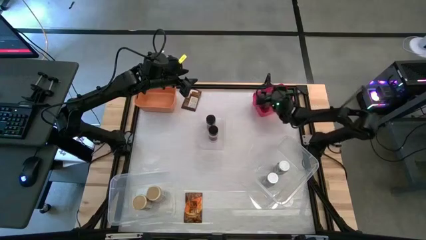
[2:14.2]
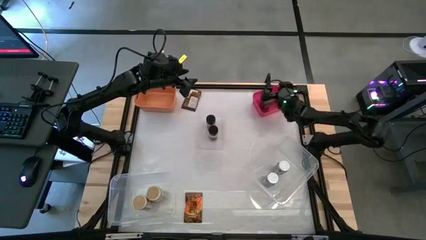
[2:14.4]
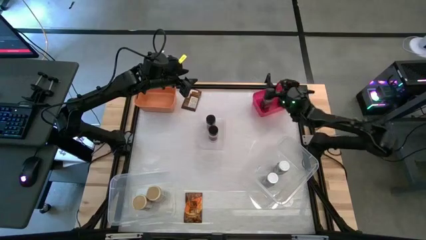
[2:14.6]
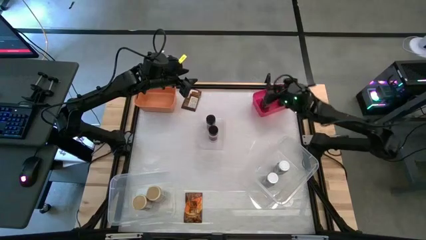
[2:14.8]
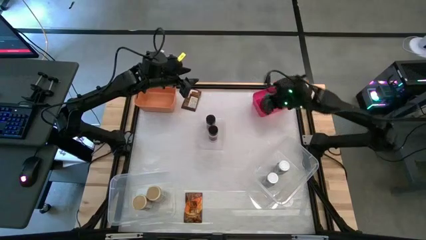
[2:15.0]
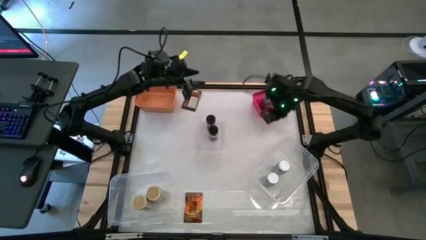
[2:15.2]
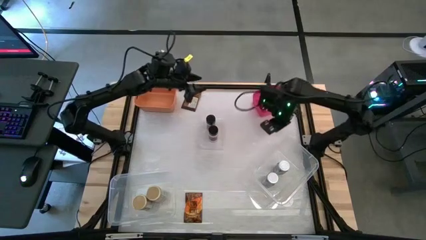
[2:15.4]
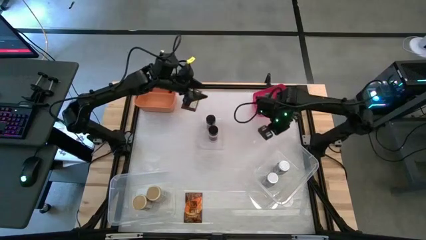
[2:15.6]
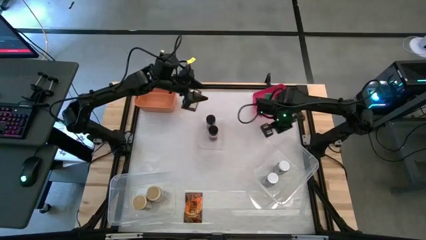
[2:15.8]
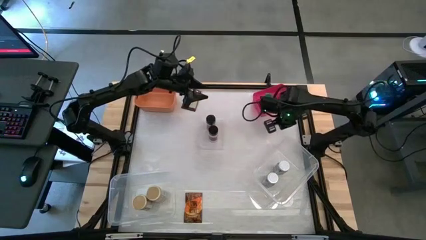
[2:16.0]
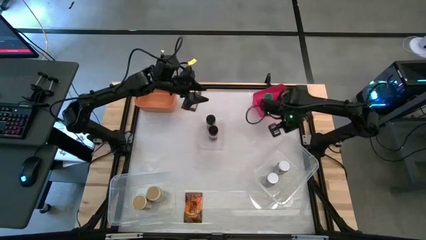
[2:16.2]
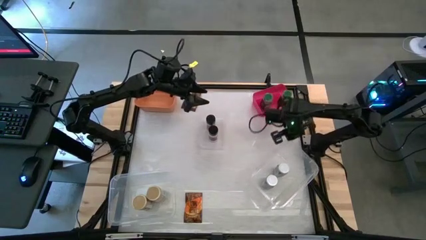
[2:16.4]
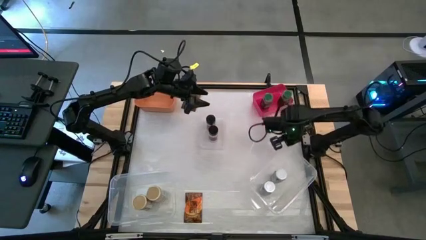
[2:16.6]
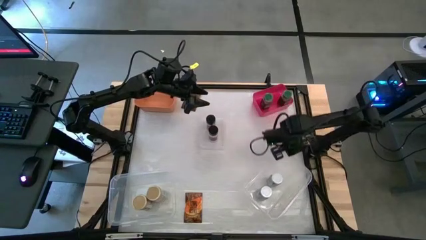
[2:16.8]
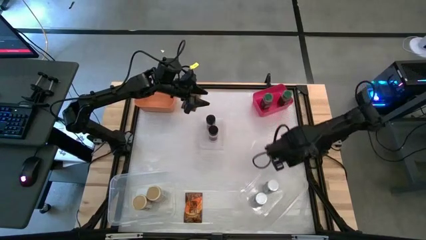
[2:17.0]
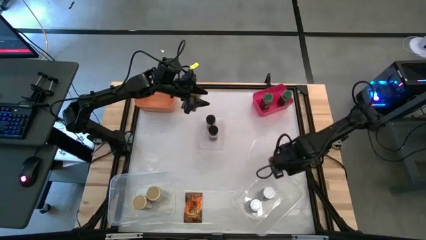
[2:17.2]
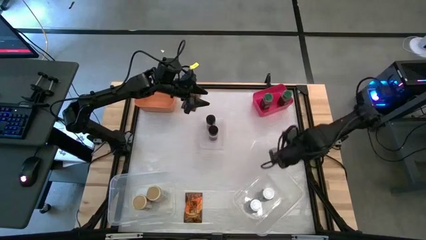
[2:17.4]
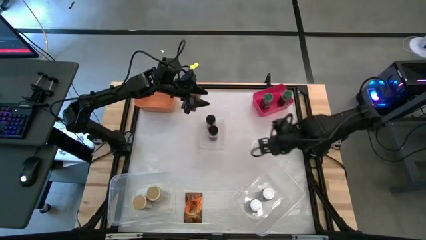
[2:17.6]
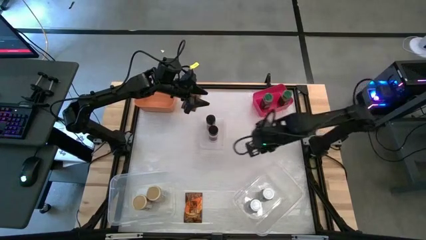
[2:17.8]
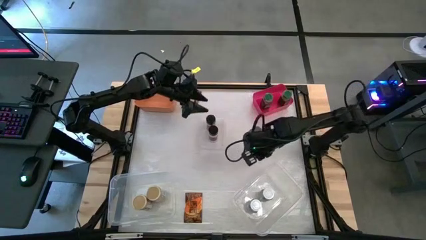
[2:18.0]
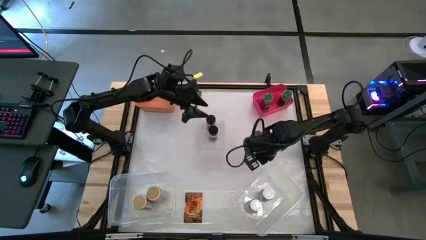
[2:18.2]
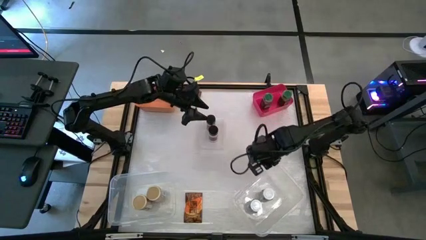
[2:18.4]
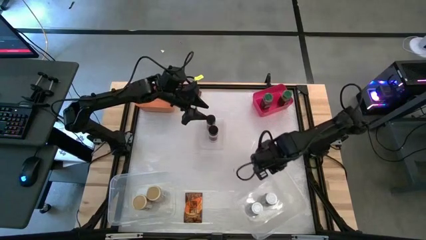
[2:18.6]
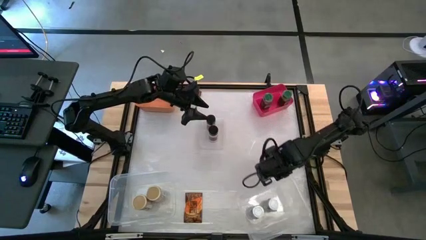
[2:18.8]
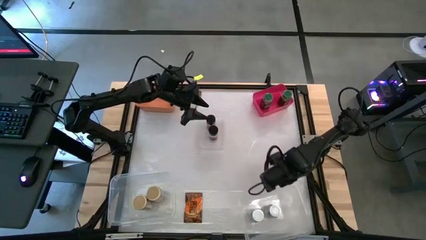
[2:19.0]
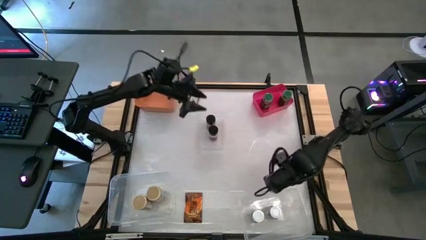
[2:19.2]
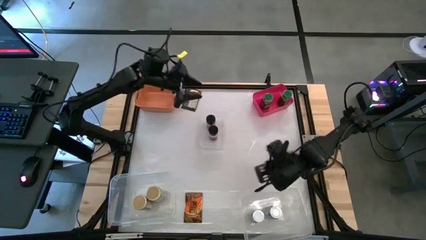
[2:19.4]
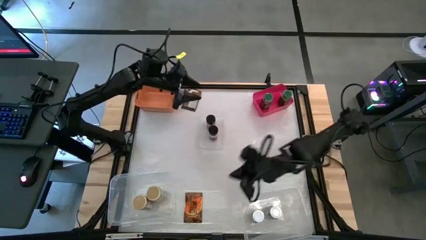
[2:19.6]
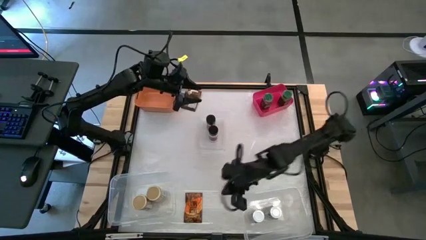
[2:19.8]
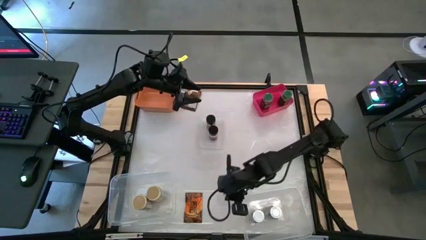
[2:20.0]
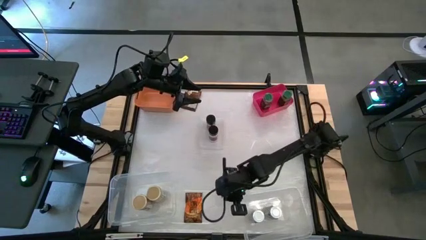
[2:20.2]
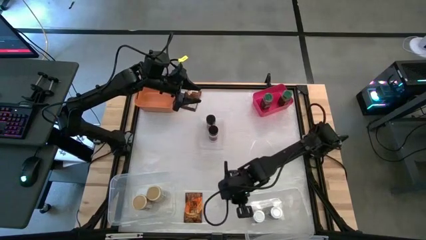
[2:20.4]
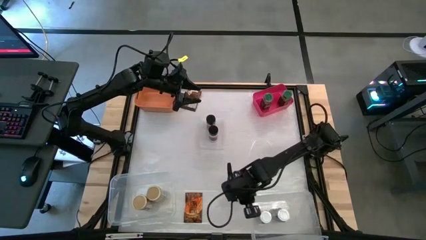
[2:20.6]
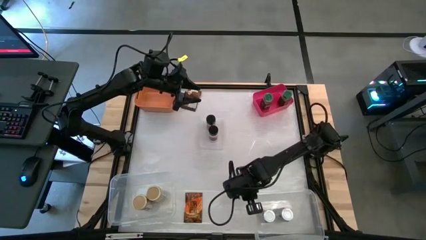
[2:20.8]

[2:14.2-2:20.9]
Task: Sort spices by type
Adjust the right transparent bin

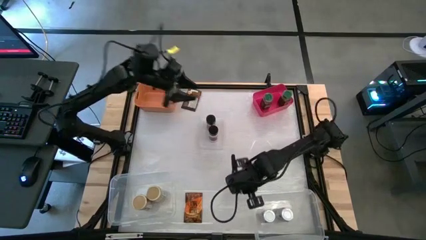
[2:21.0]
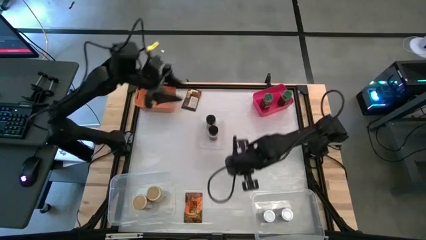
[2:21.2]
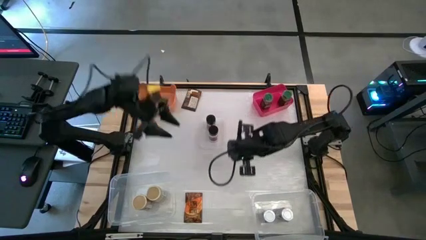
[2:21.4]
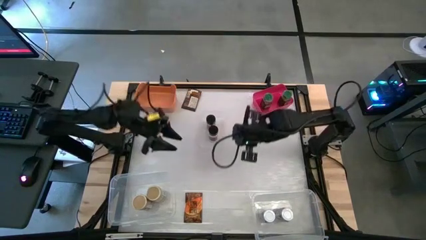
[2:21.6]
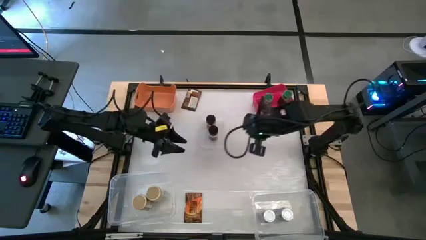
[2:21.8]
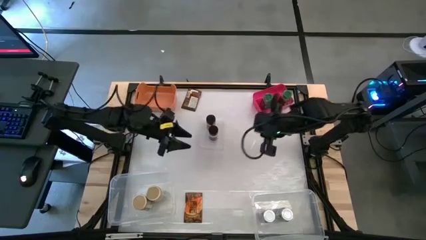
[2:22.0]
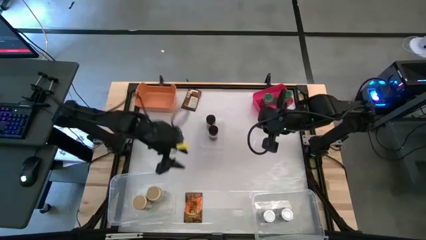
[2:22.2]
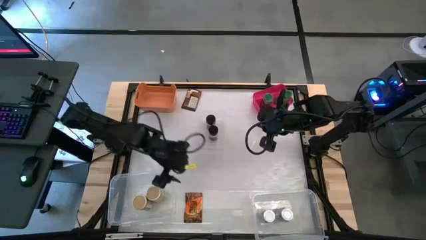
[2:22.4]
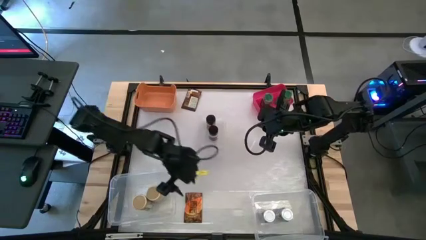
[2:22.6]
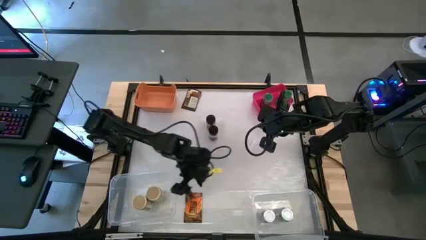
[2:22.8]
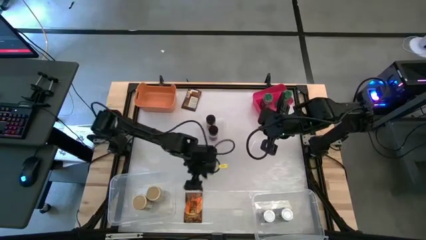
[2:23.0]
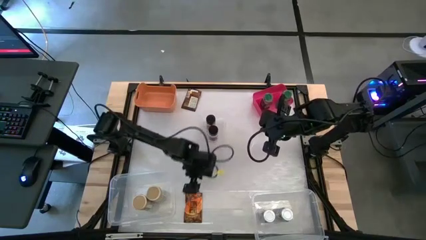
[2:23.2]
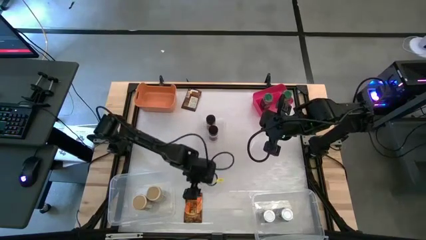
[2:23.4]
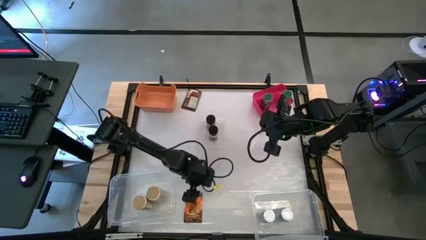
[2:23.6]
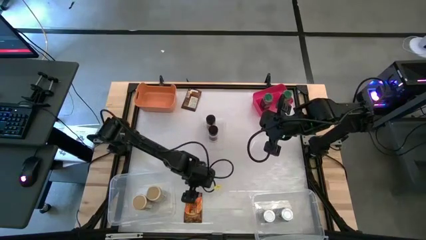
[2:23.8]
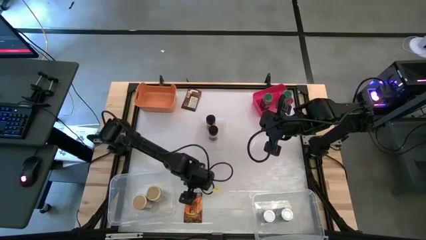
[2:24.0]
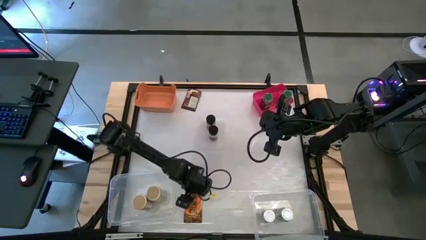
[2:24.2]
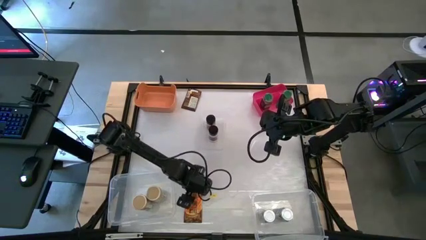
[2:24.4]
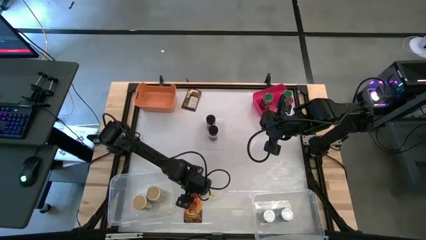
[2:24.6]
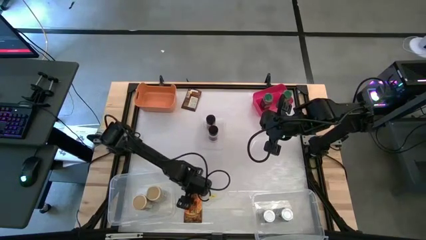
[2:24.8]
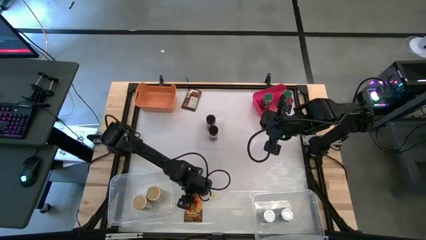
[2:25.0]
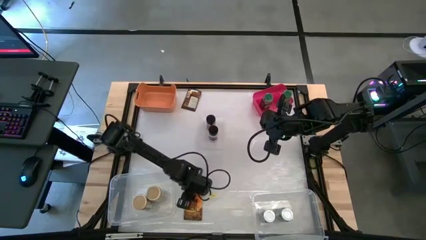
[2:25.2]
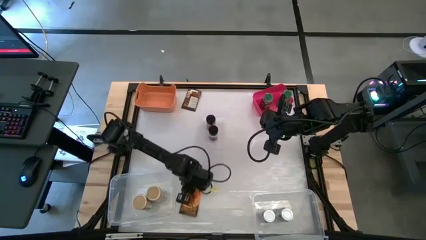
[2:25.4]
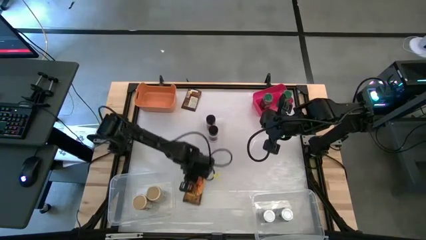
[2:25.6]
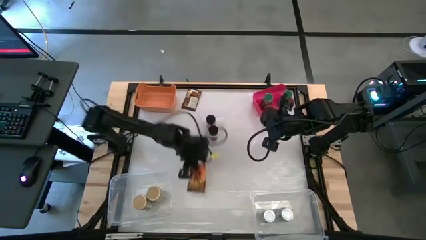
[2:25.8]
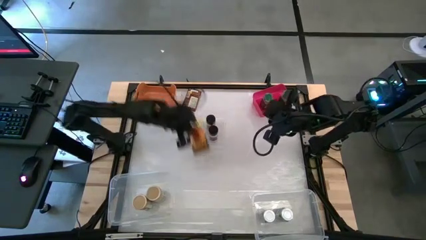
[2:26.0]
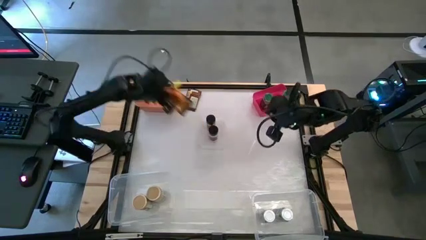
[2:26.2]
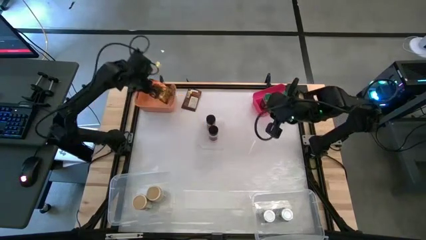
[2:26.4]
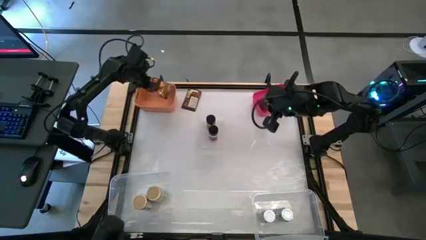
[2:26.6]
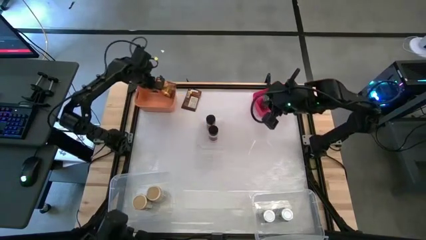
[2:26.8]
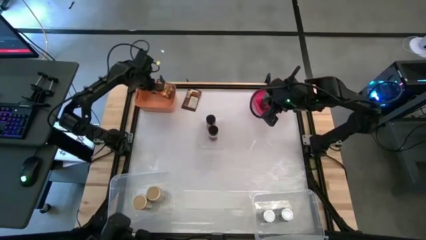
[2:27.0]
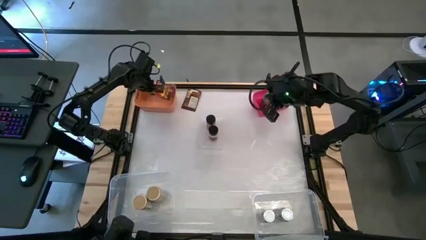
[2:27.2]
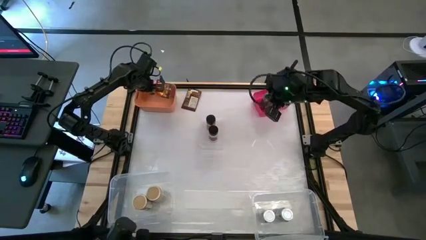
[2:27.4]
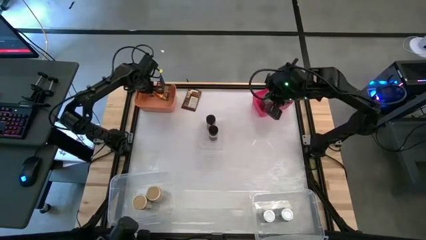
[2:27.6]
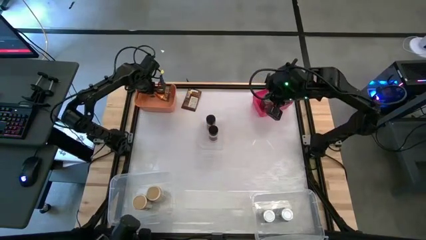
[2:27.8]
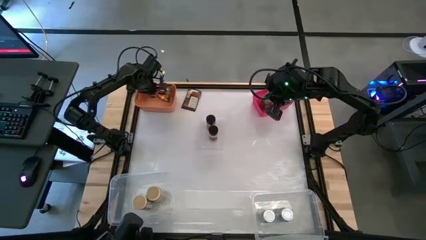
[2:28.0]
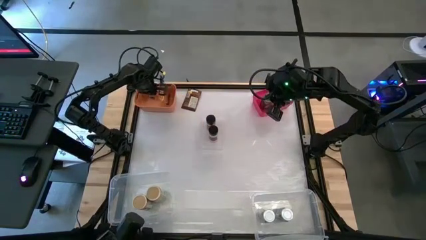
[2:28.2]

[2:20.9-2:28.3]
Put the bottom orange seasoning pack into the orange bin

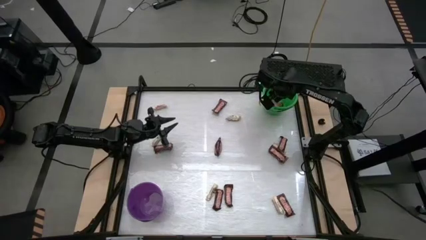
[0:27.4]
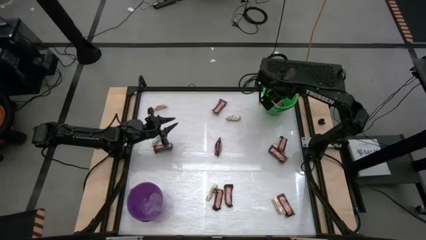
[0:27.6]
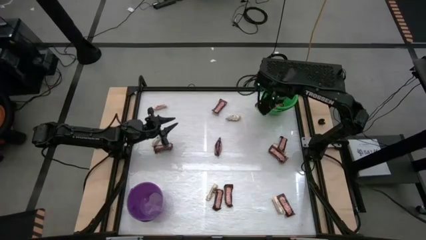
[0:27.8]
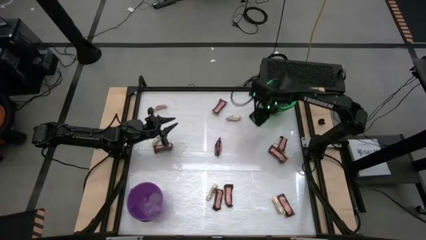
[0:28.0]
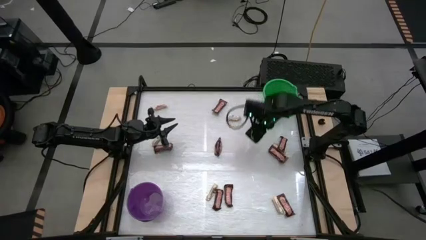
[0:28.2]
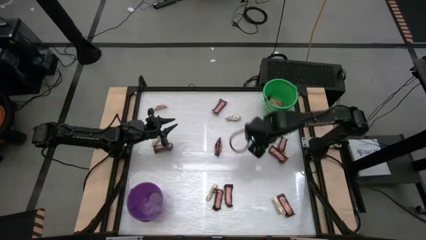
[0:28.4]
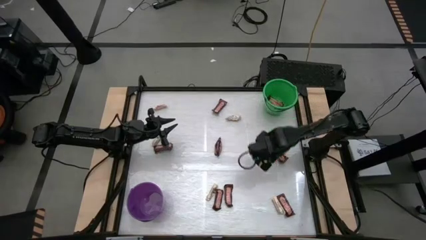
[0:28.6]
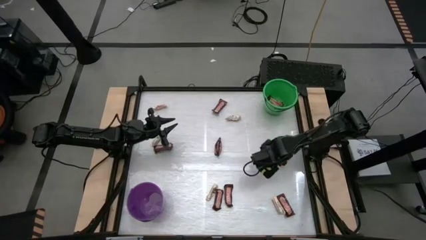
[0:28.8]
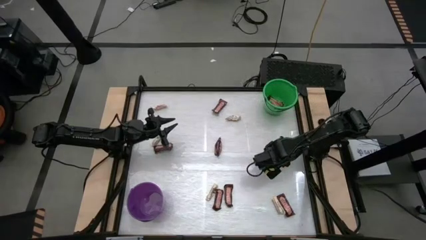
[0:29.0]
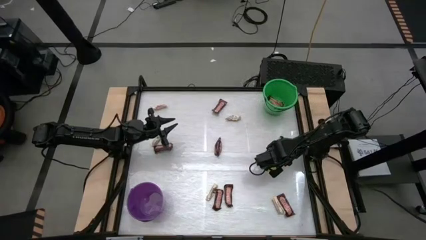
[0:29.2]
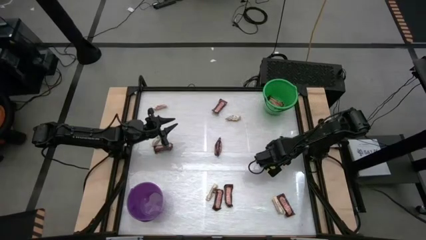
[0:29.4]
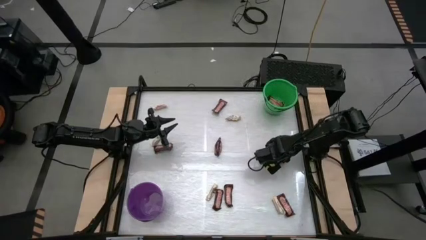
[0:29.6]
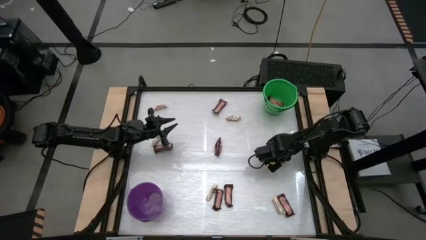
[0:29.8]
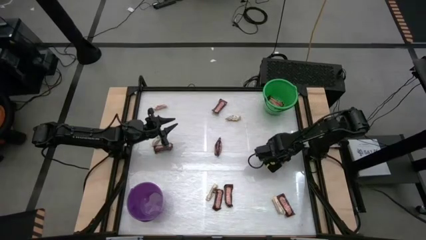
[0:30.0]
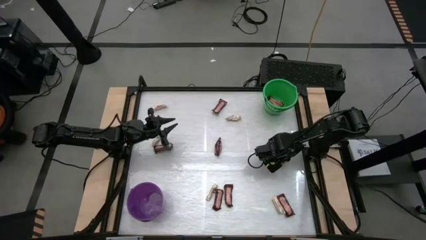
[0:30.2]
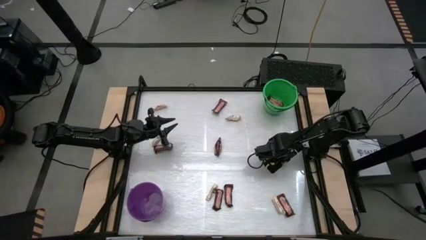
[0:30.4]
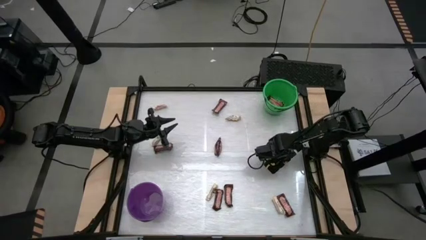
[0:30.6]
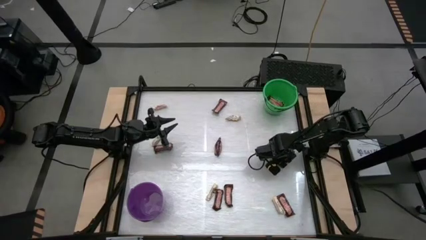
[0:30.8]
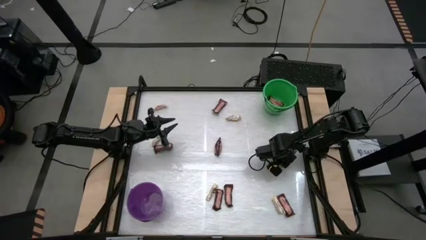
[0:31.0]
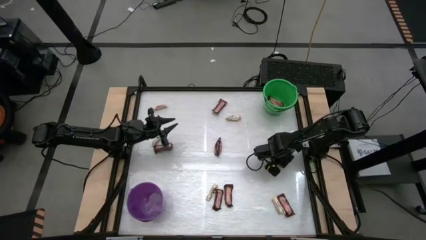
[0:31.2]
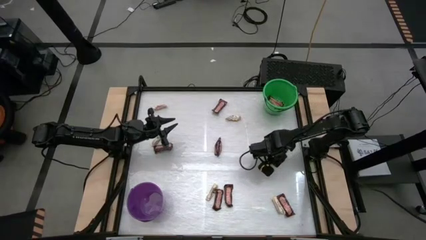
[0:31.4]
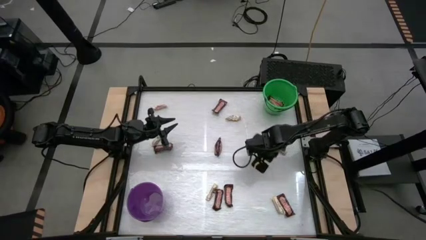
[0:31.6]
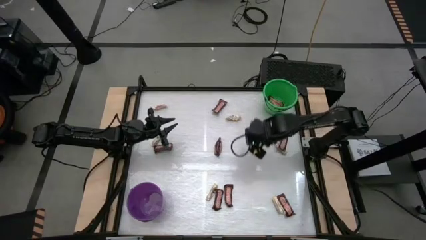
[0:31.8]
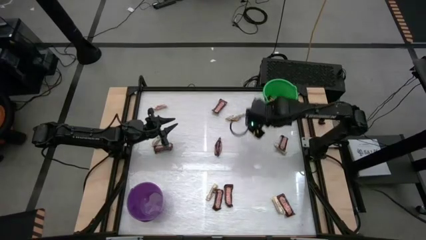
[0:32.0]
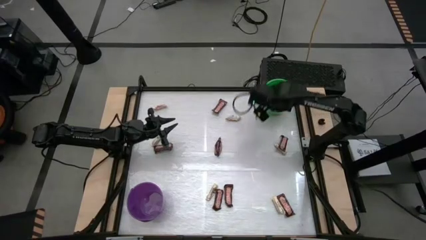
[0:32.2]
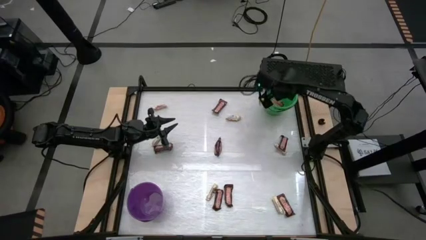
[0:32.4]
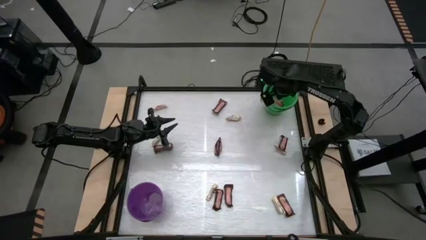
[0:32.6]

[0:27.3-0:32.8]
Task: Sort candy by brand, put in halloween buckets
Put the brown candy bar into the green bucket
